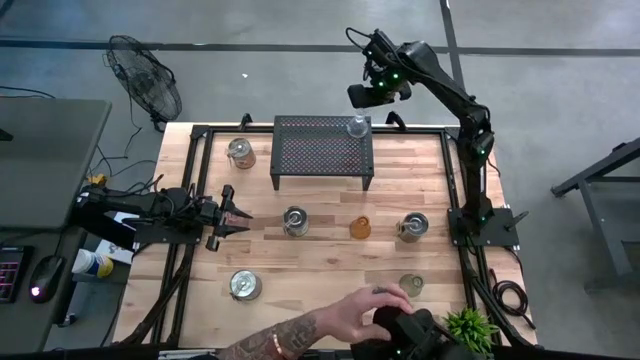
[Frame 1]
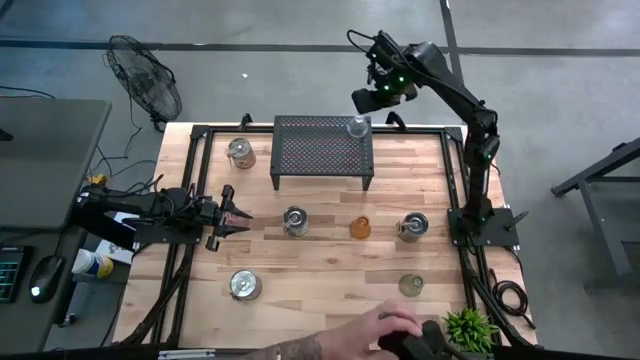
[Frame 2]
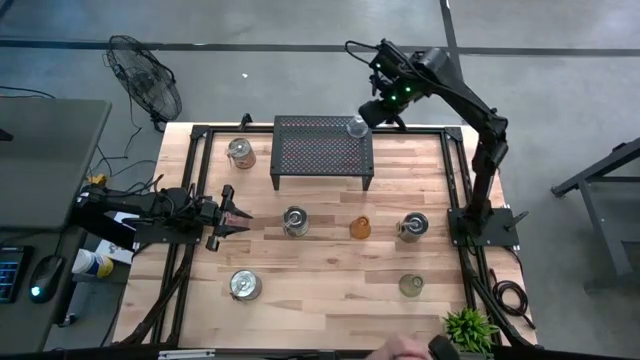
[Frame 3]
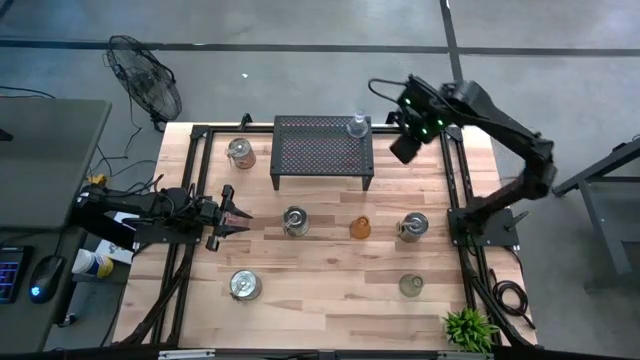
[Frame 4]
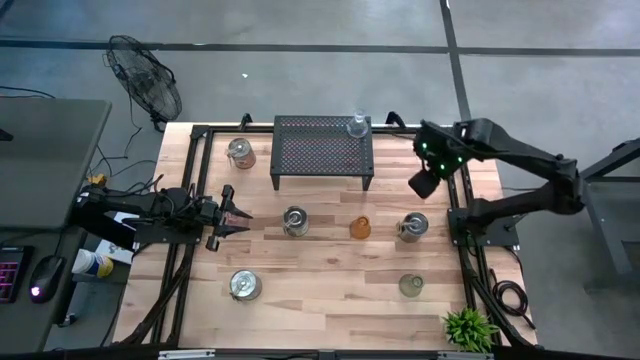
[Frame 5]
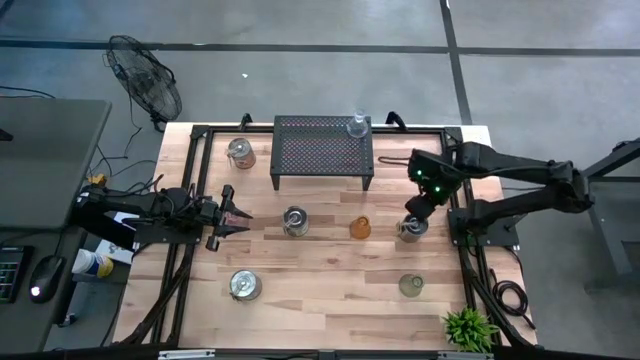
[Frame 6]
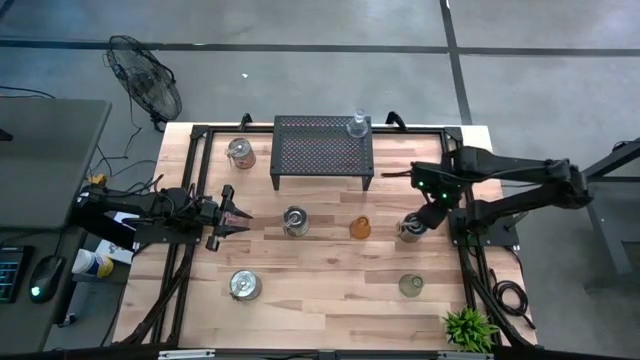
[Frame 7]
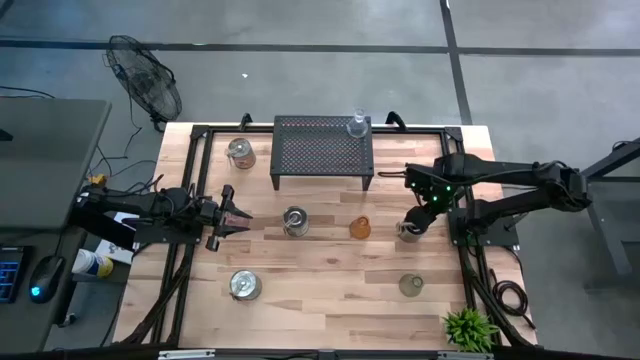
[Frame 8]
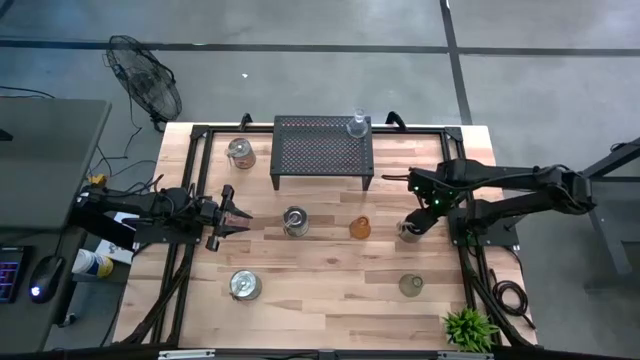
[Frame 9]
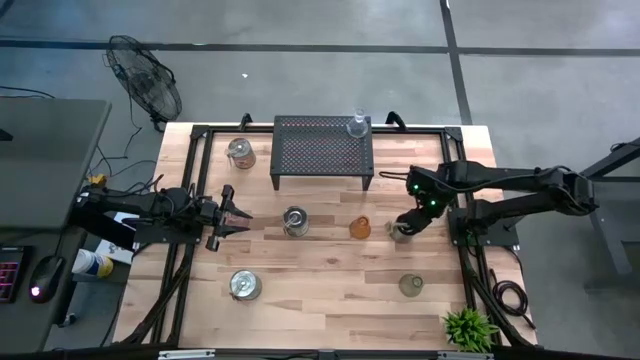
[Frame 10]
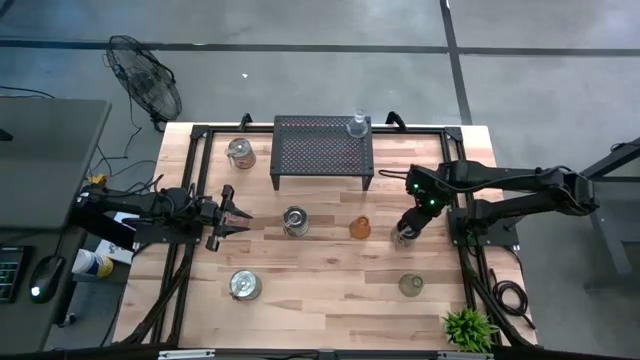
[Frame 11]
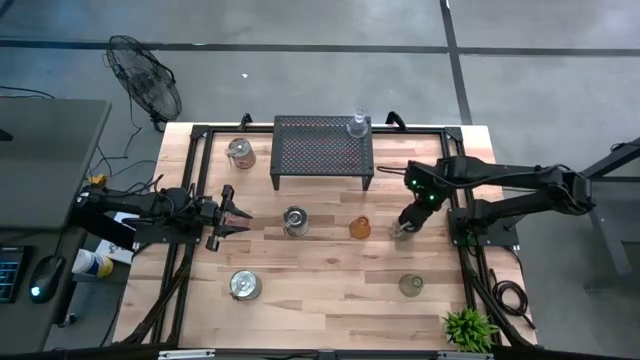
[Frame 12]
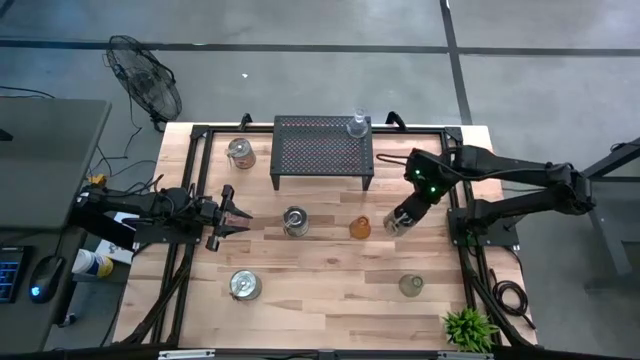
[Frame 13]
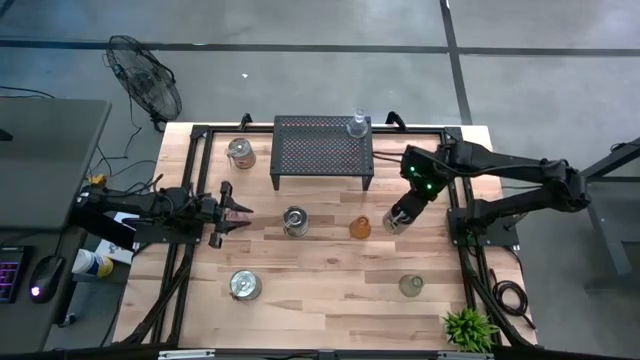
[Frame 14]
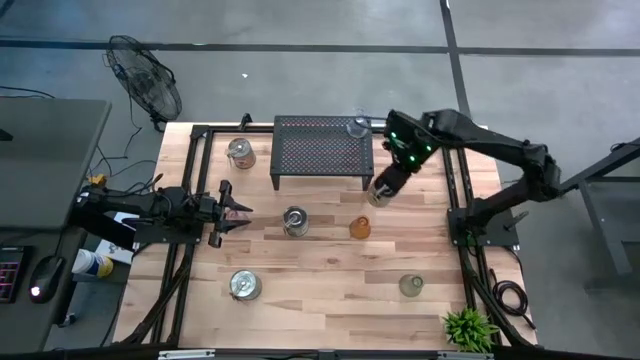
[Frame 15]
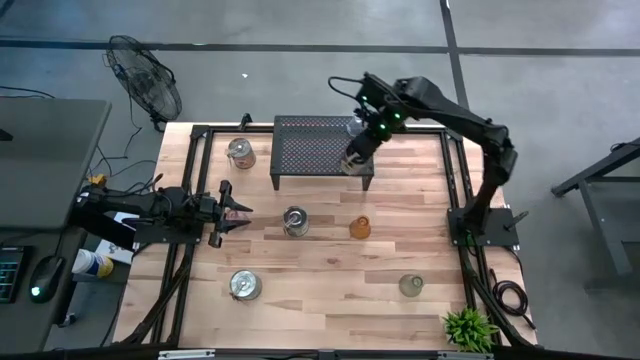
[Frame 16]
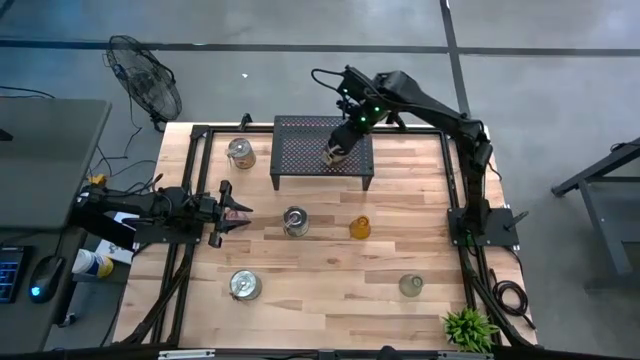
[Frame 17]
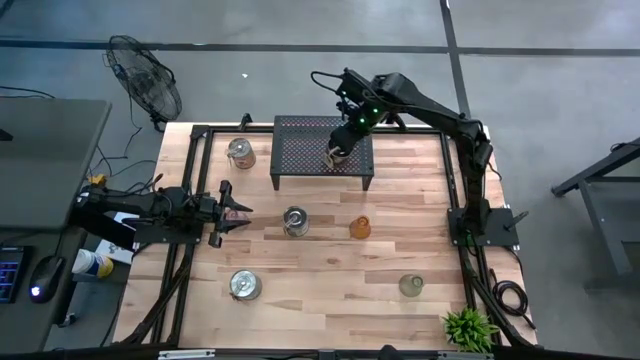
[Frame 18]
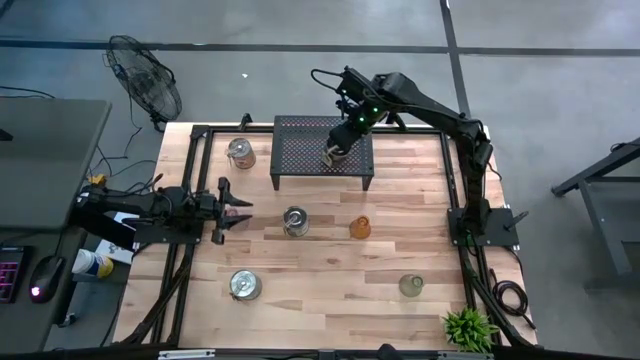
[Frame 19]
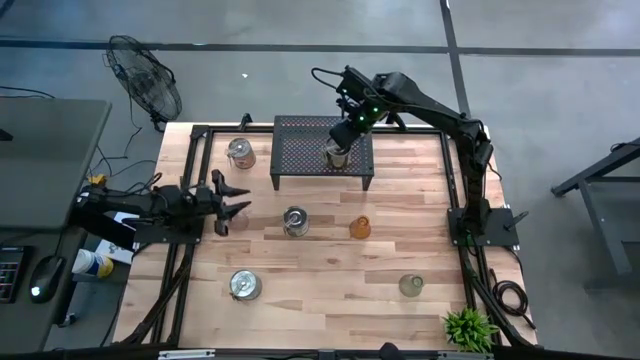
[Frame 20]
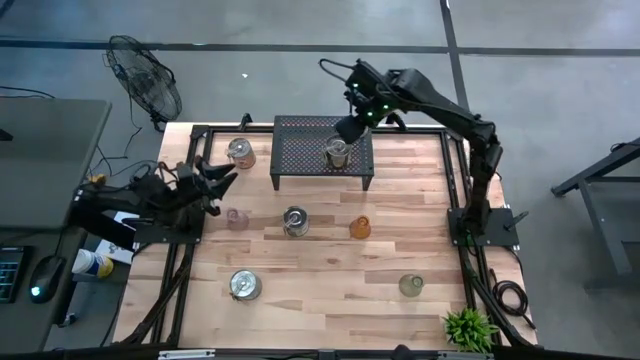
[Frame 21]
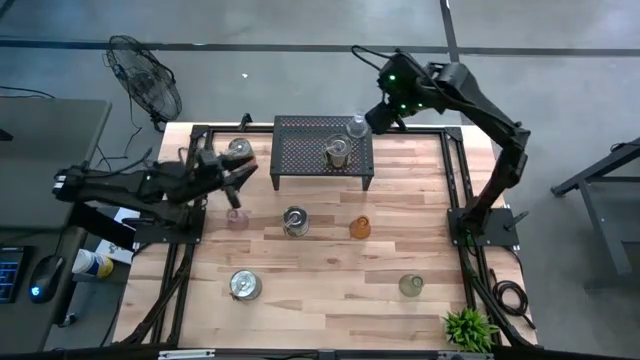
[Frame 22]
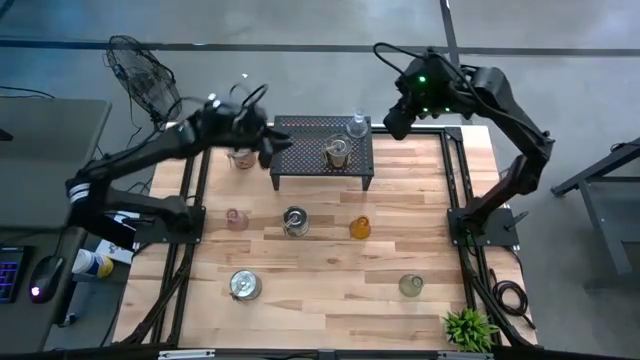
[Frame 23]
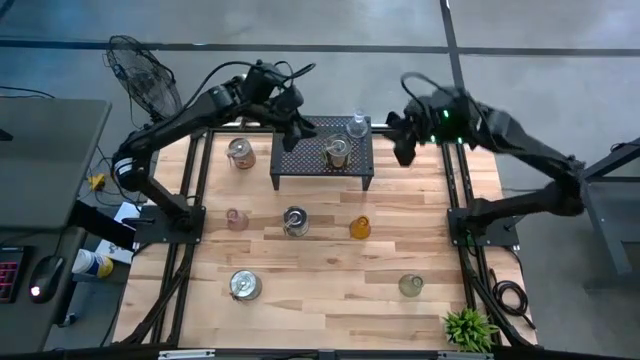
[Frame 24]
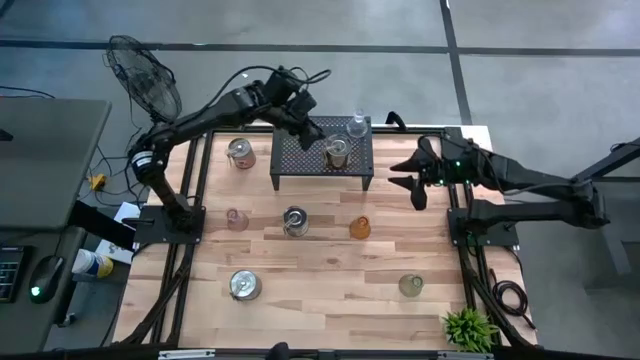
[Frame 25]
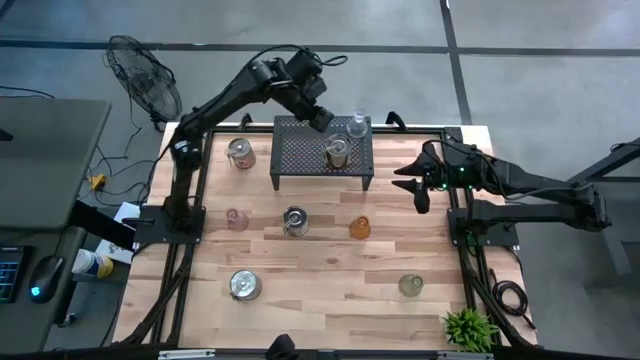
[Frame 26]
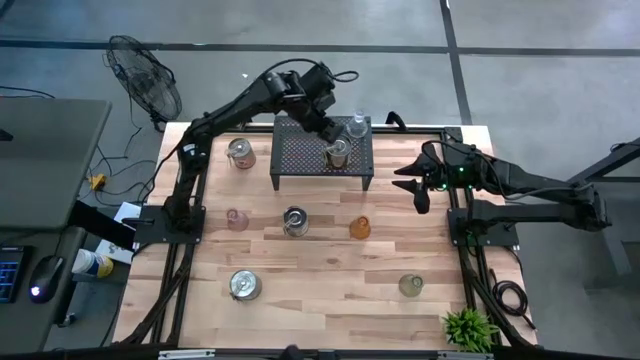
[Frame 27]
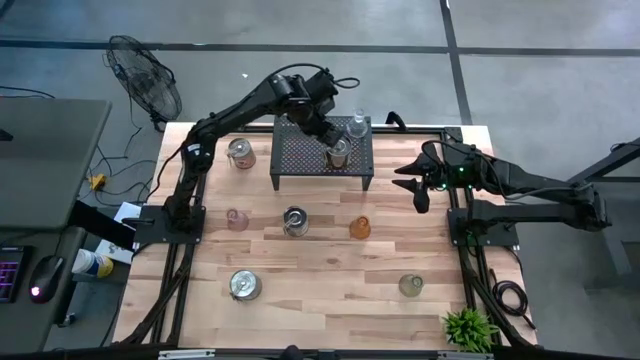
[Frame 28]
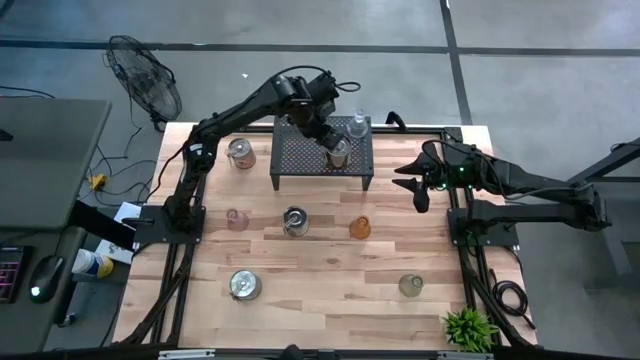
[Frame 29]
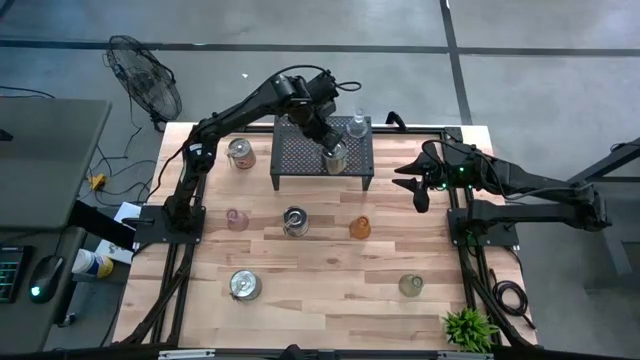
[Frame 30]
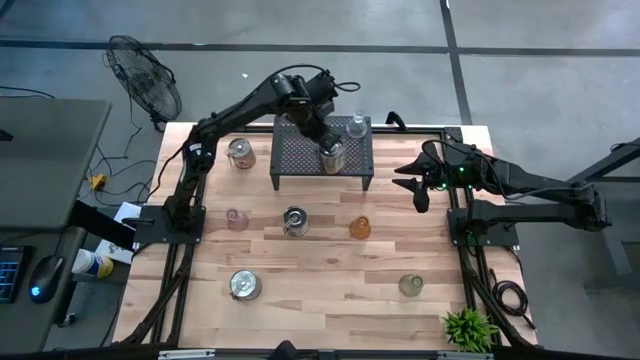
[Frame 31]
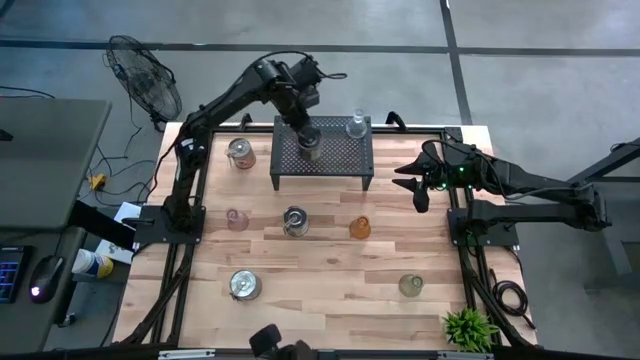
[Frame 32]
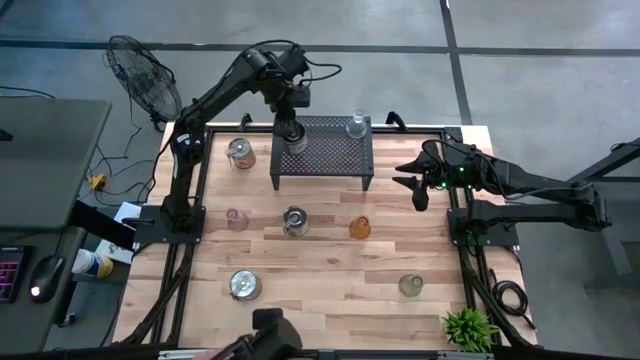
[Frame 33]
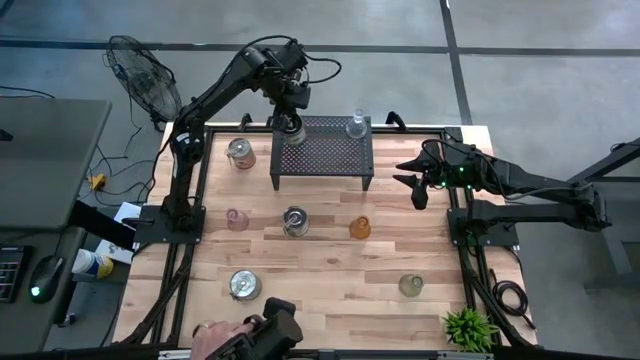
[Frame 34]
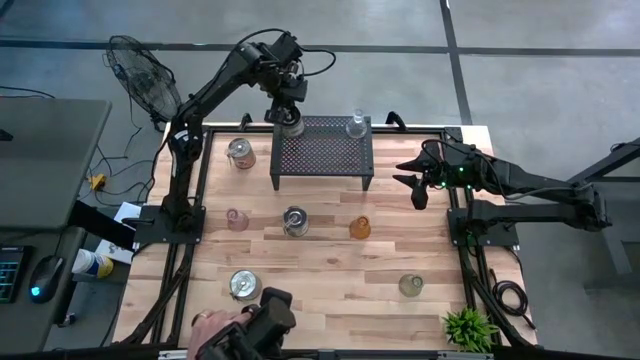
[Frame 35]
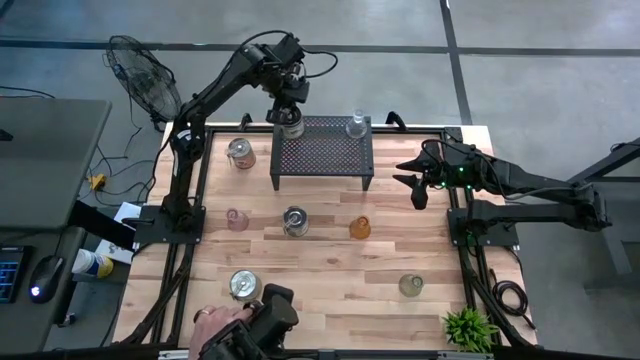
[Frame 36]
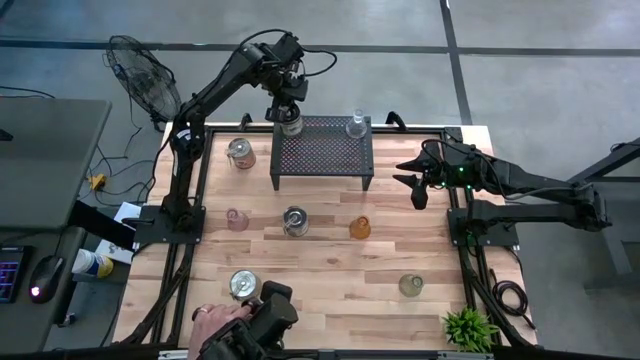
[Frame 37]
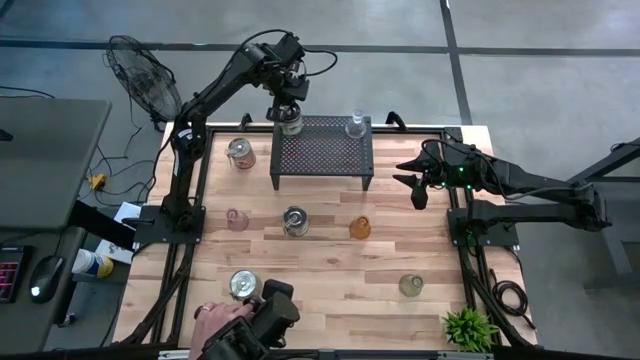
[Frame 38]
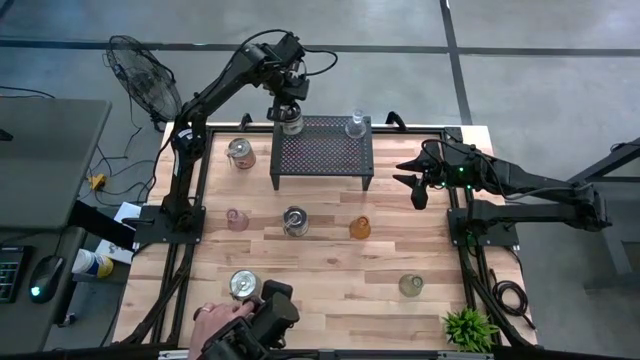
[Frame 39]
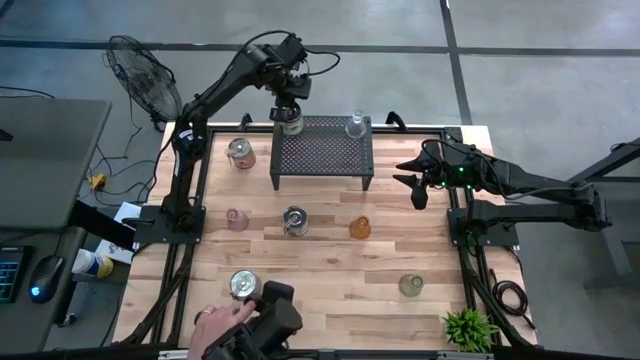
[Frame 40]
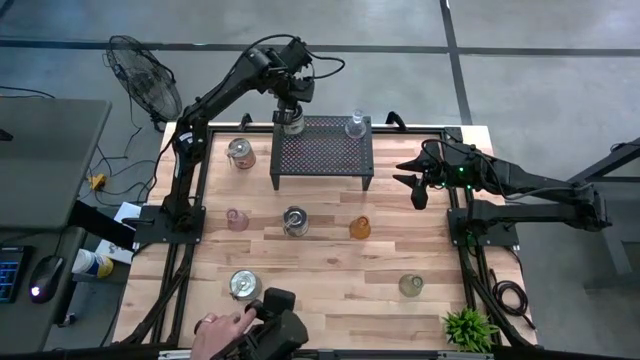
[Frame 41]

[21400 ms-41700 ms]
Task: Pick & Place candle stick holders
Put the silver scented candle can on the shelf
